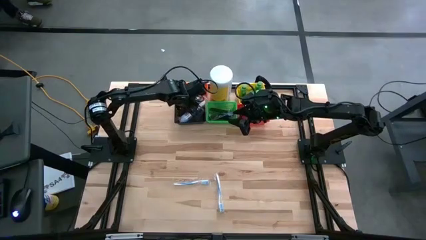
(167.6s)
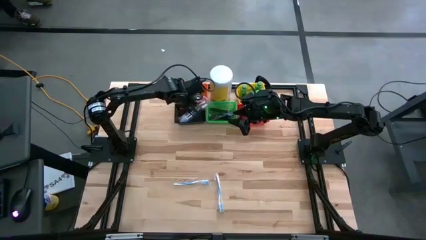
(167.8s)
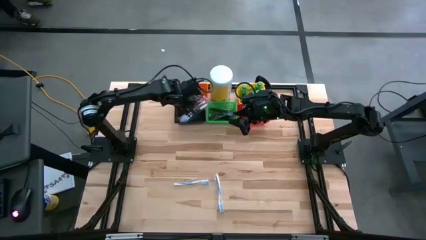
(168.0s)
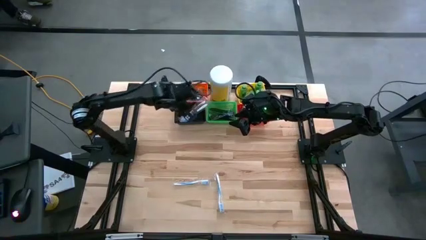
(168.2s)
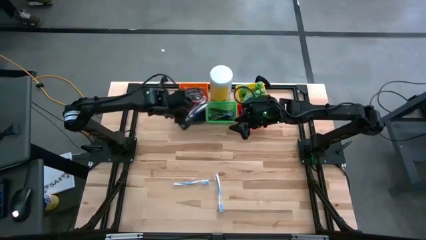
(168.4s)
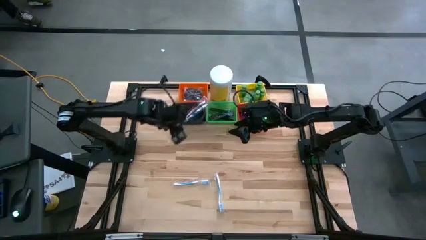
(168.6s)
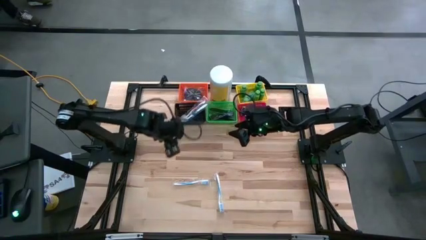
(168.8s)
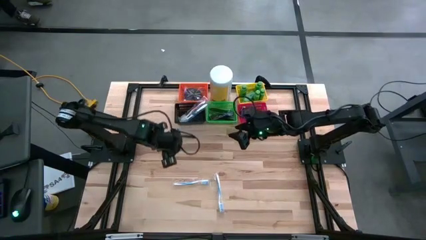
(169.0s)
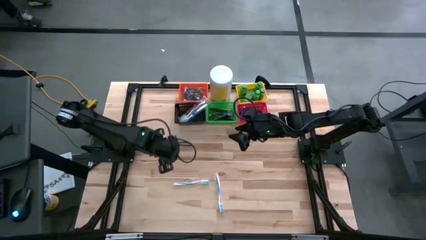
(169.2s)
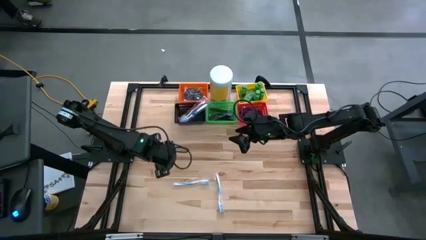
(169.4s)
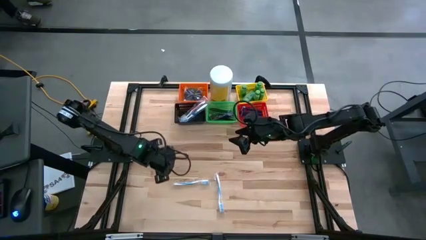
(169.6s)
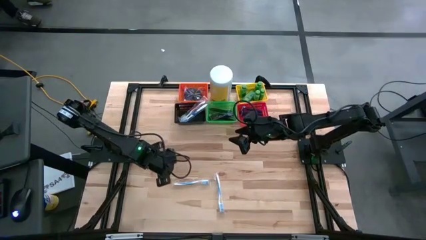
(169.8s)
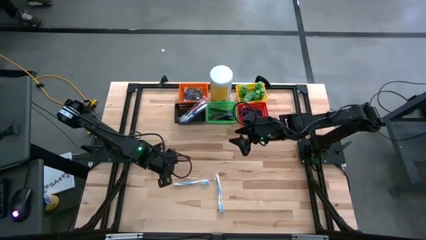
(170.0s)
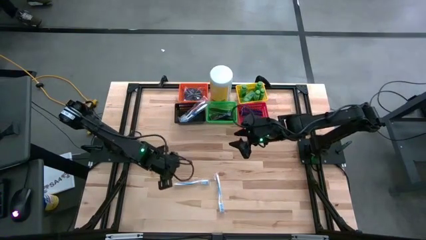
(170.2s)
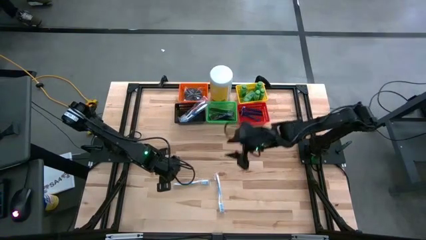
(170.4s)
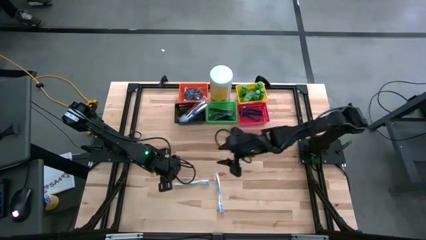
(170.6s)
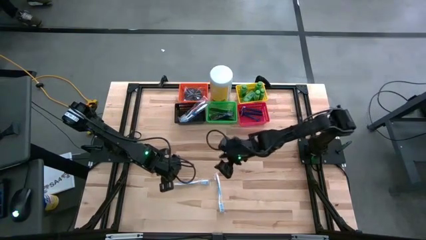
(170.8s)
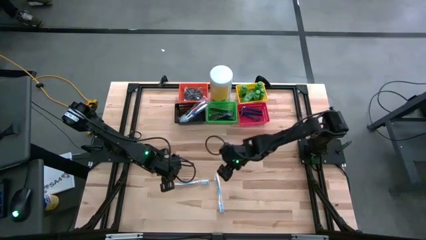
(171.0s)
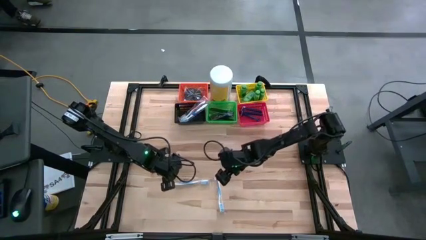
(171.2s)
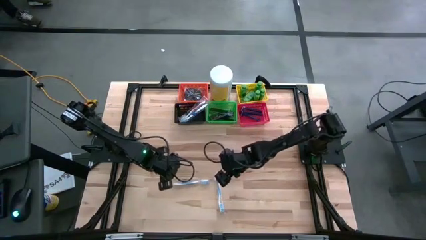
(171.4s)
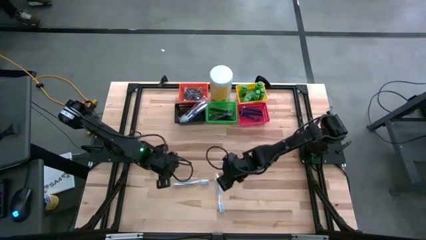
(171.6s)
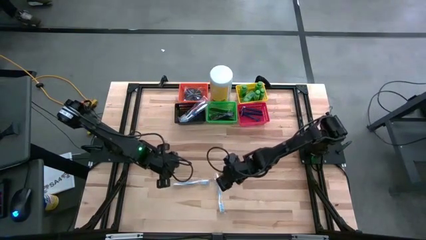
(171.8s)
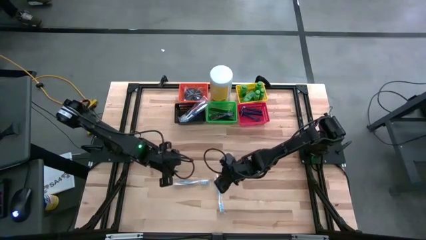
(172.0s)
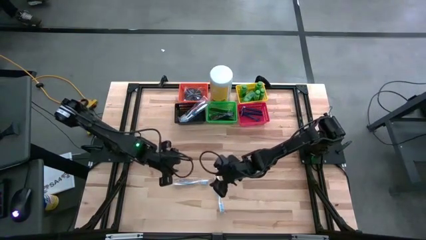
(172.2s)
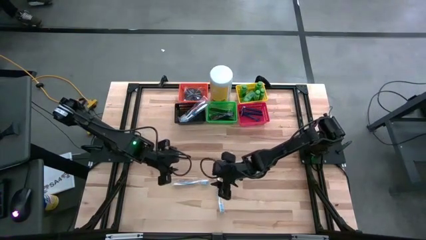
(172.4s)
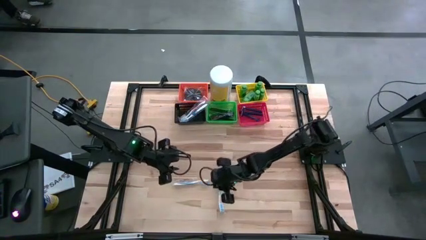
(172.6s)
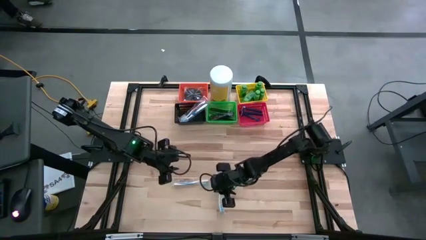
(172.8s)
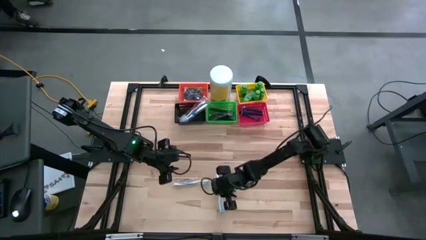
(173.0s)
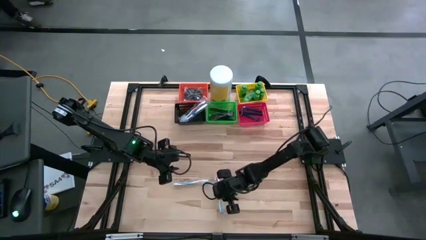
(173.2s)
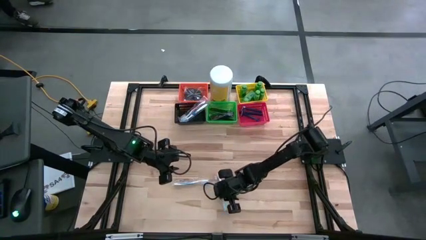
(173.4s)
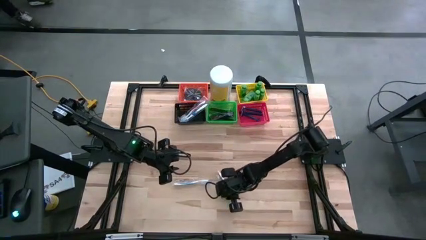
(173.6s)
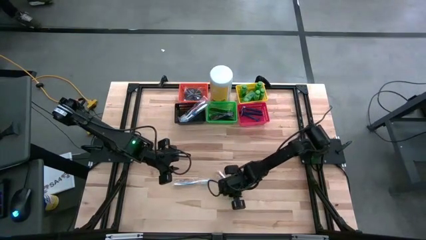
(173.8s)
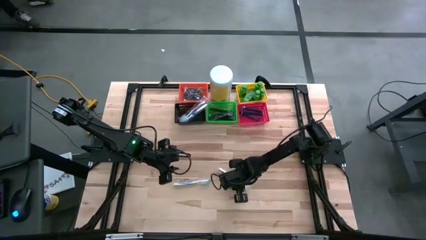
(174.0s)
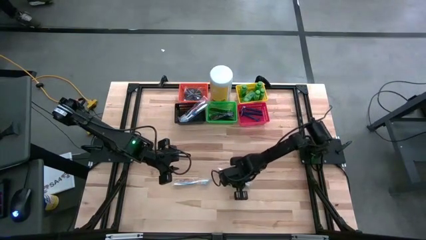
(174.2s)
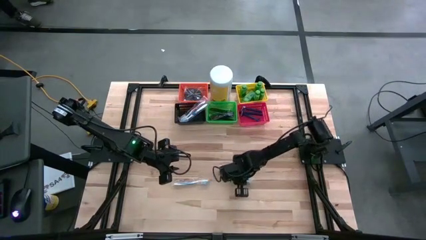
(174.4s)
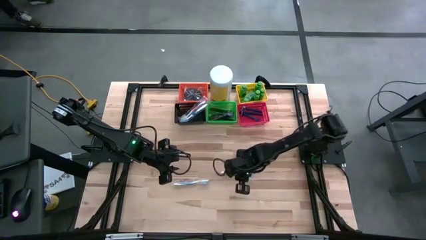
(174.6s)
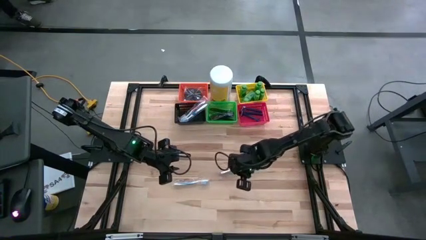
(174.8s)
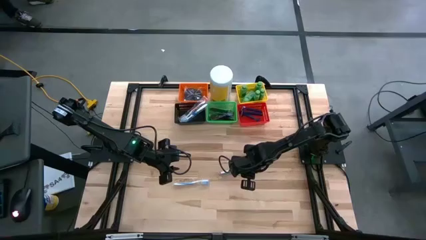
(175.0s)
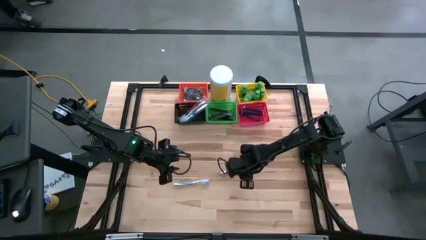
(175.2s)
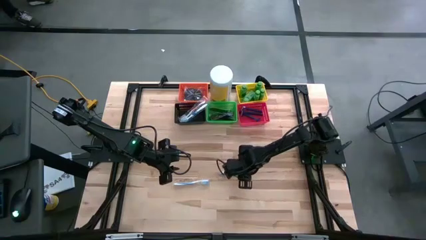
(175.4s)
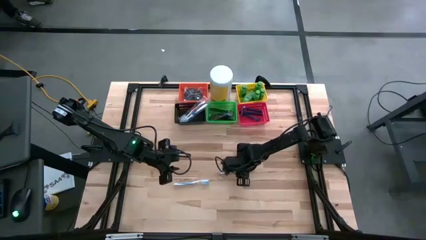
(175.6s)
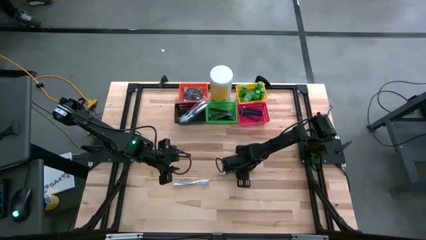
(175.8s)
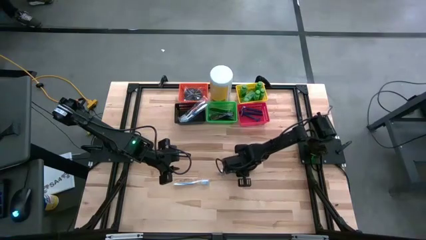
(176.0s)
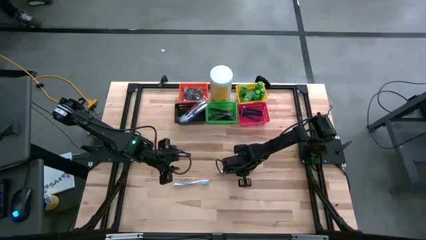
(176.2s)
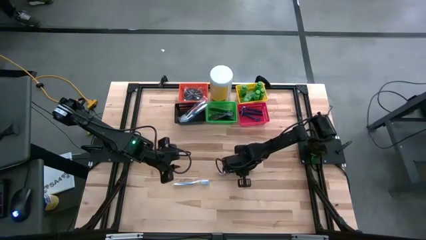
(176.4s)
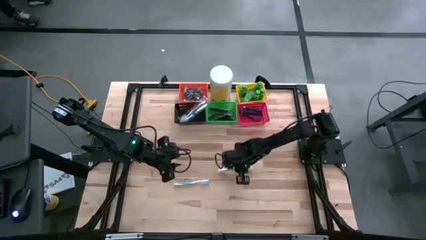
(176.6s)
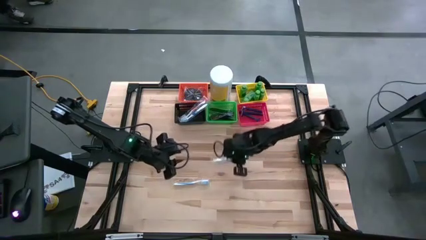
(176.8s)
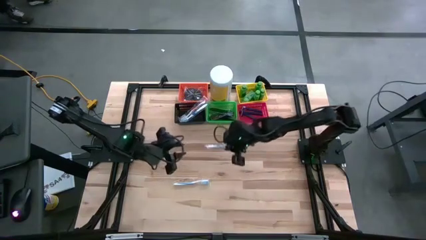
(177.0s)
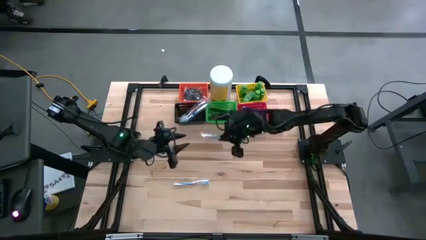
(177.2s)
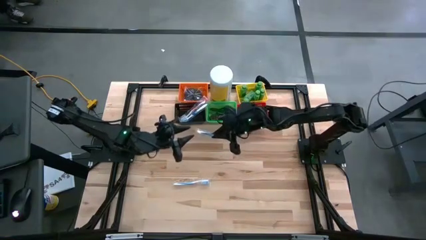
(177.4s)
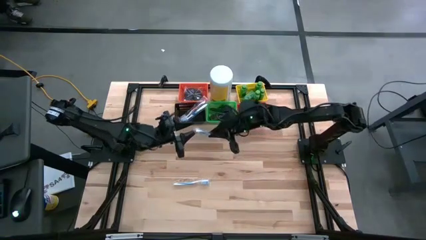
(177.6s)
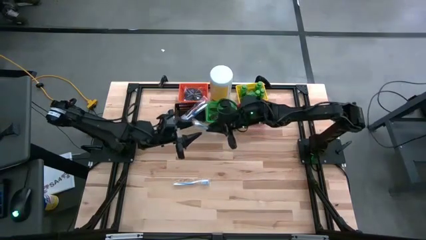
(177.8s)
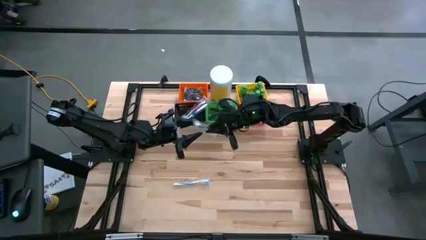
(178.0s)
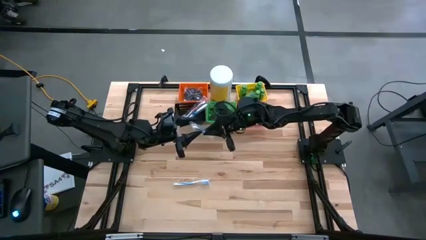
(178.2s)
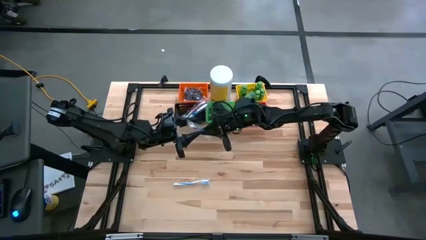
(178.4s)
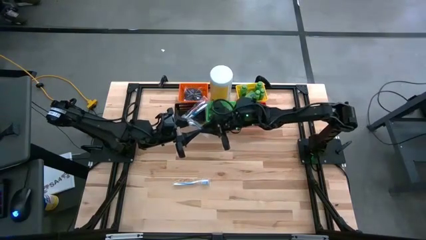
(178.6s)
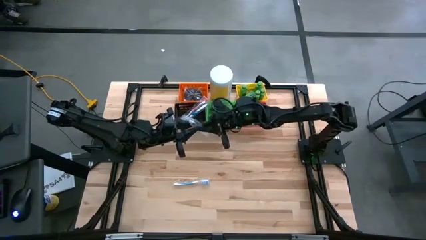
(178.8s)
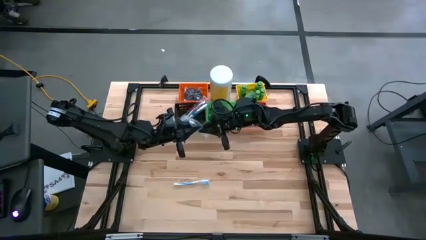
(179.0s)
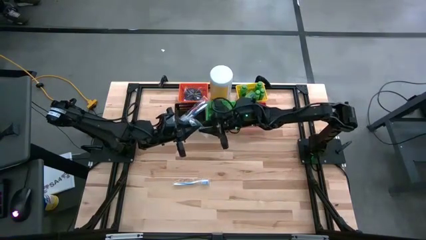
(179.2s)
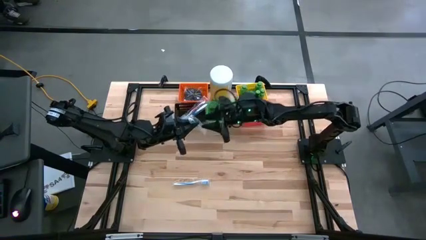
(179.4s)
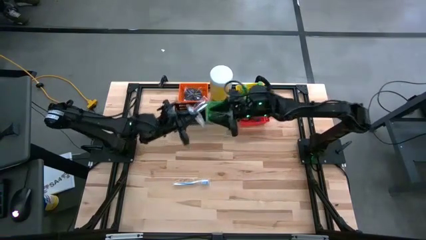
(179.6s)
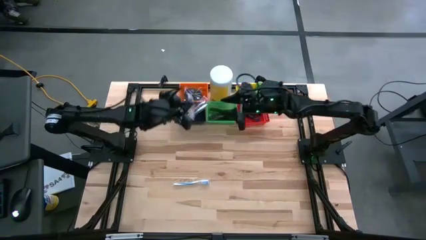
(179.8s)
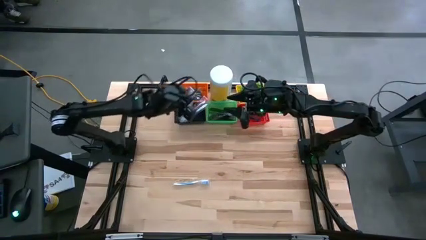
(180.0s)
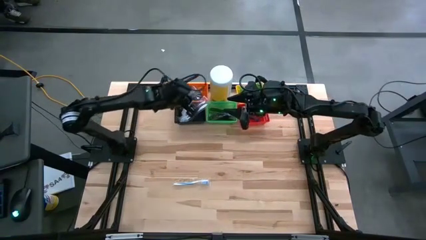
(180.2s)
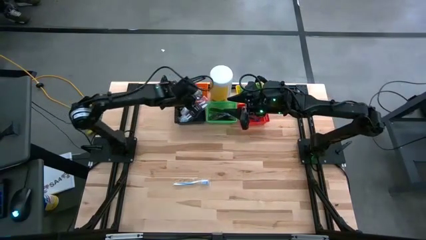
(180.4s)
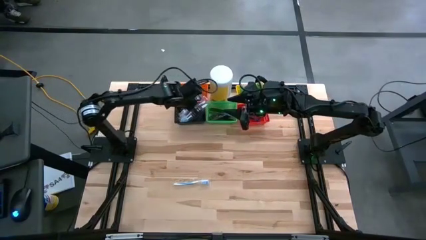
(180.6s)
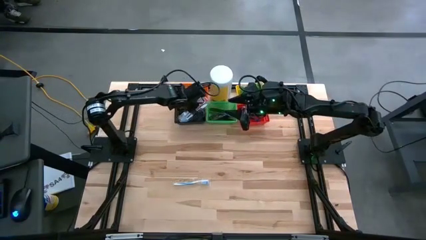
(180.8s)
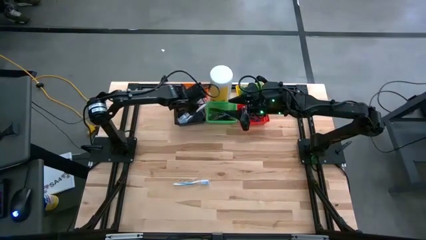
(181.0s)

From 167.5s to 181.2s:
Task: Pick & Place Travel size toiletries
Put the blue toothbrush into the black bin
